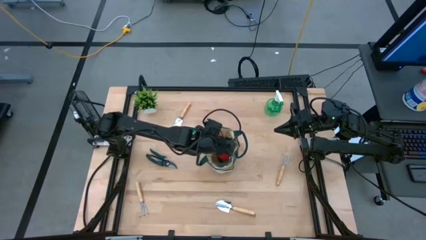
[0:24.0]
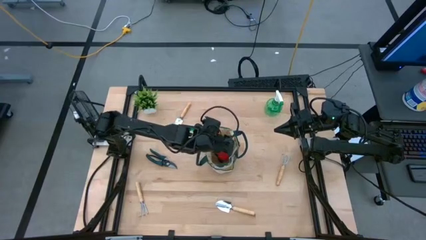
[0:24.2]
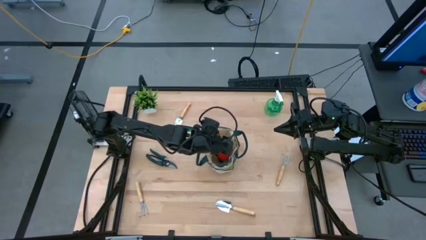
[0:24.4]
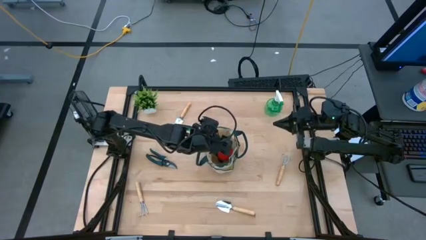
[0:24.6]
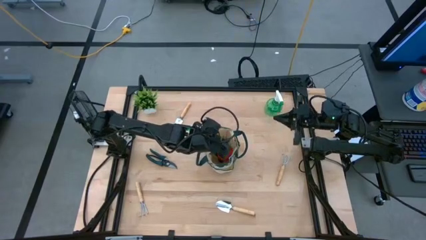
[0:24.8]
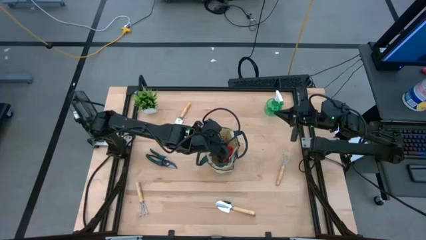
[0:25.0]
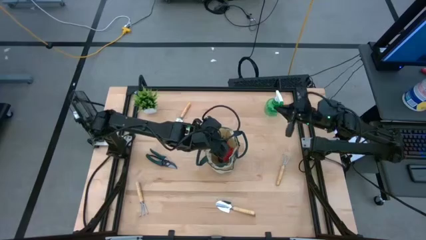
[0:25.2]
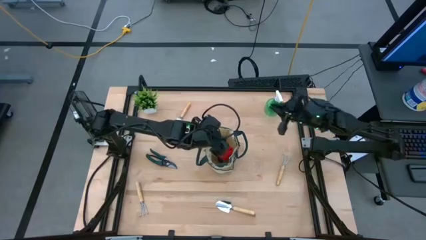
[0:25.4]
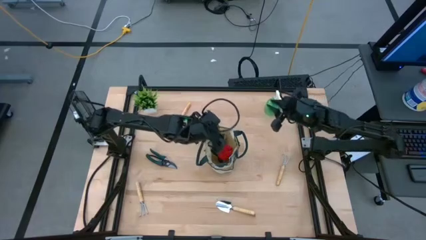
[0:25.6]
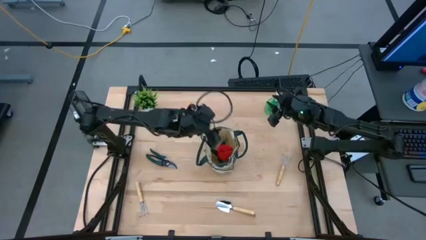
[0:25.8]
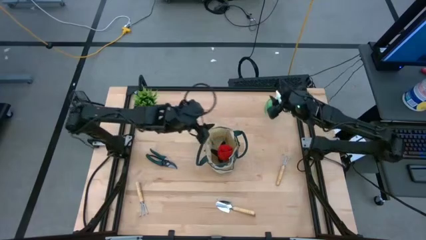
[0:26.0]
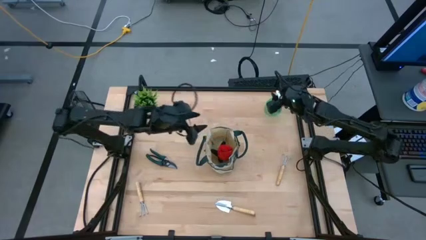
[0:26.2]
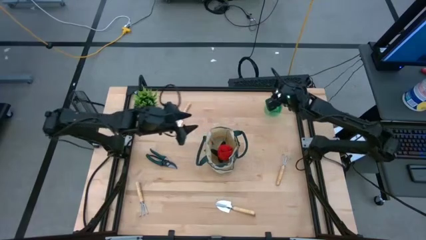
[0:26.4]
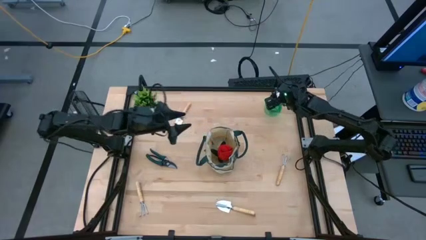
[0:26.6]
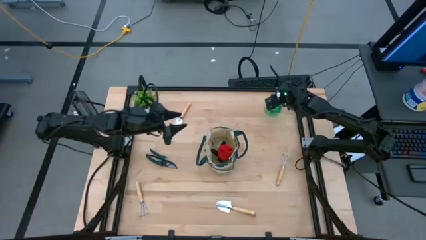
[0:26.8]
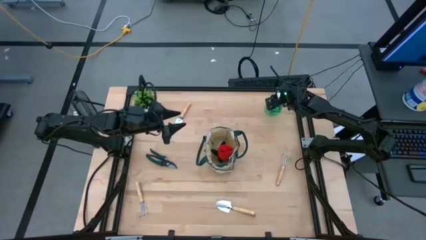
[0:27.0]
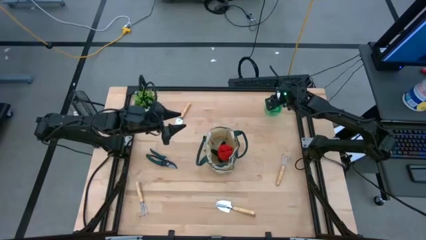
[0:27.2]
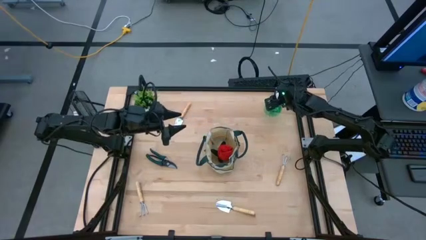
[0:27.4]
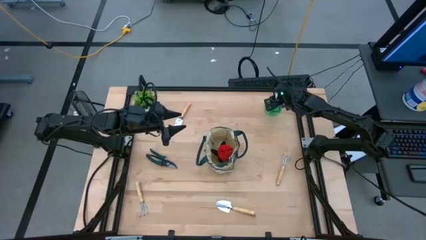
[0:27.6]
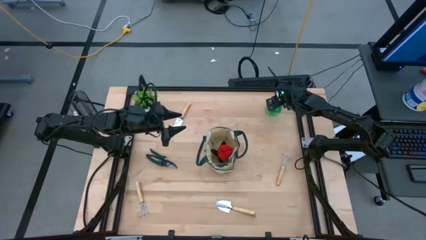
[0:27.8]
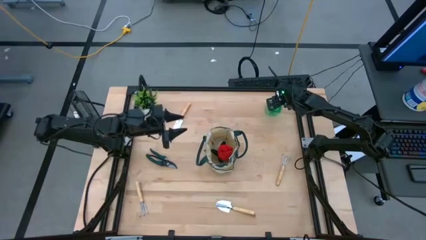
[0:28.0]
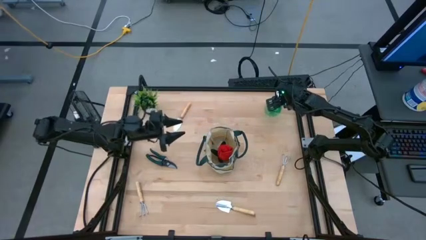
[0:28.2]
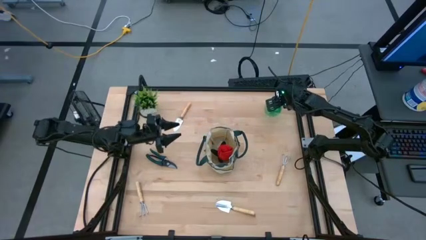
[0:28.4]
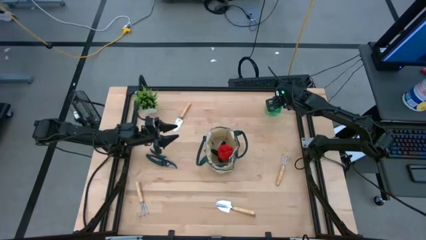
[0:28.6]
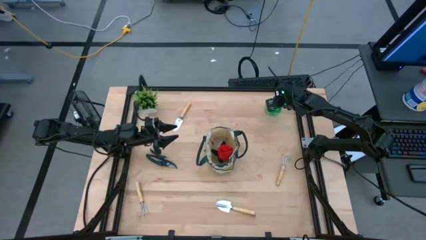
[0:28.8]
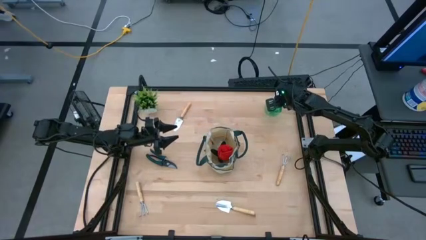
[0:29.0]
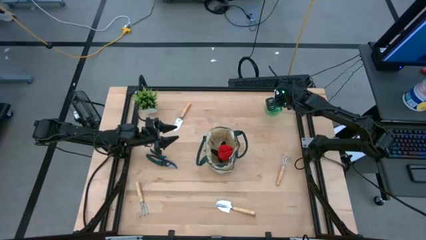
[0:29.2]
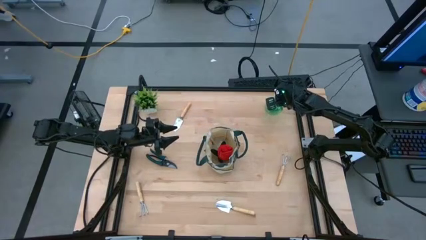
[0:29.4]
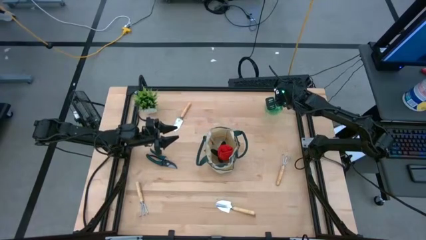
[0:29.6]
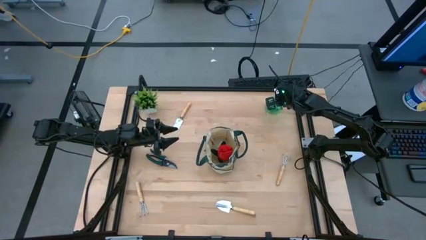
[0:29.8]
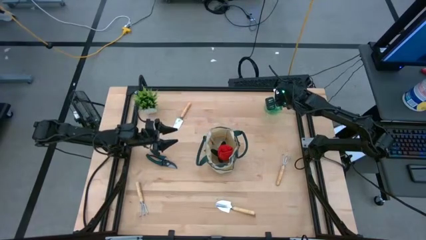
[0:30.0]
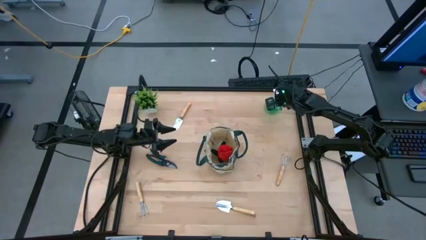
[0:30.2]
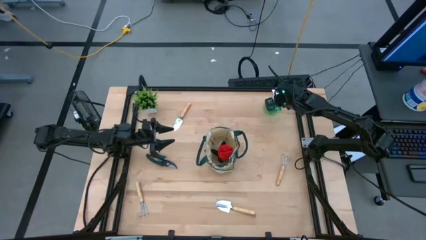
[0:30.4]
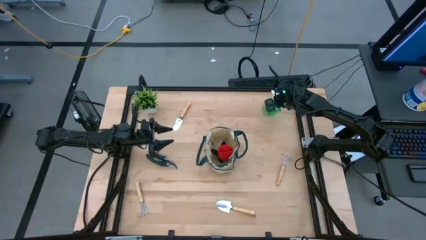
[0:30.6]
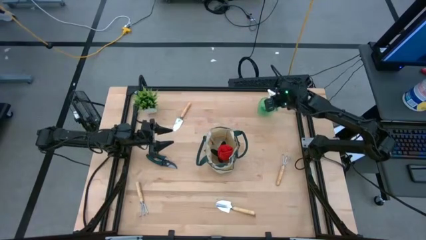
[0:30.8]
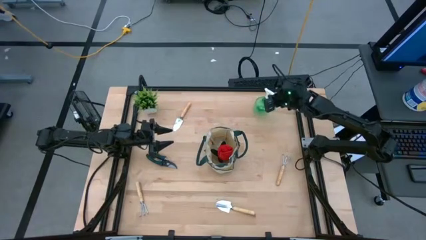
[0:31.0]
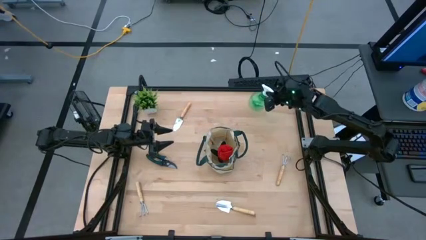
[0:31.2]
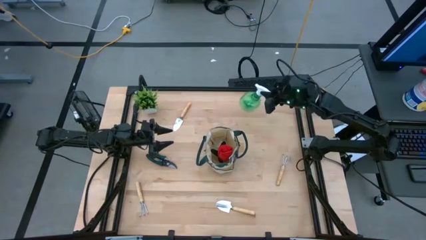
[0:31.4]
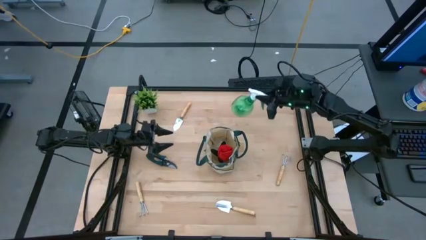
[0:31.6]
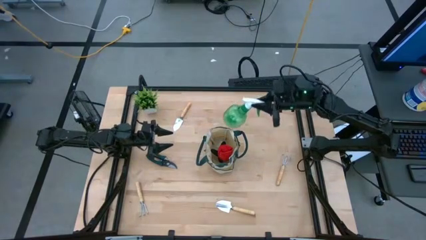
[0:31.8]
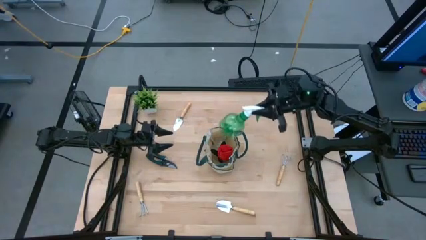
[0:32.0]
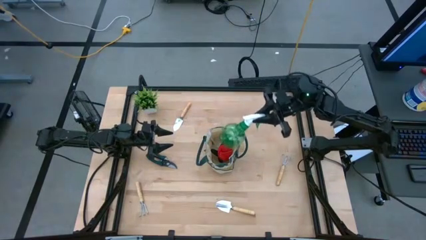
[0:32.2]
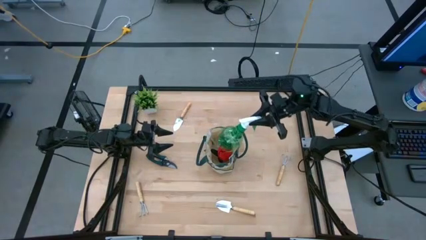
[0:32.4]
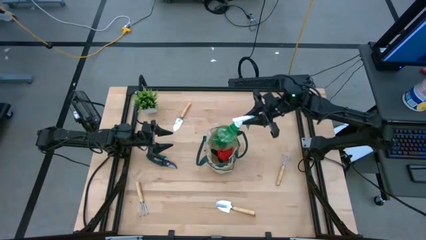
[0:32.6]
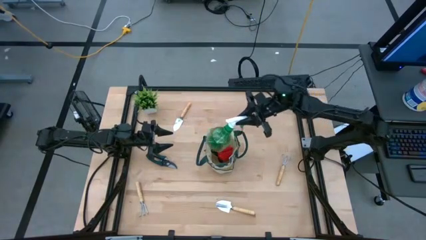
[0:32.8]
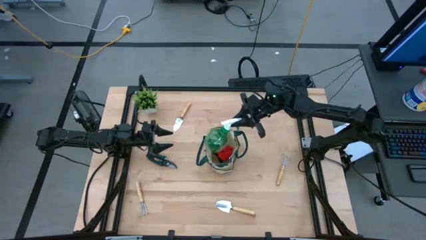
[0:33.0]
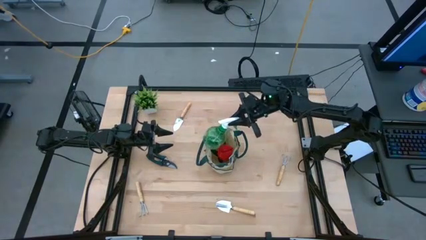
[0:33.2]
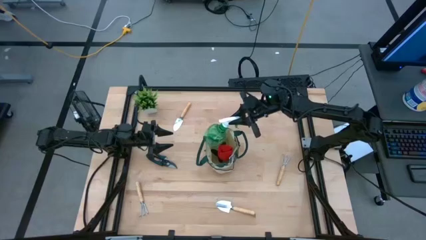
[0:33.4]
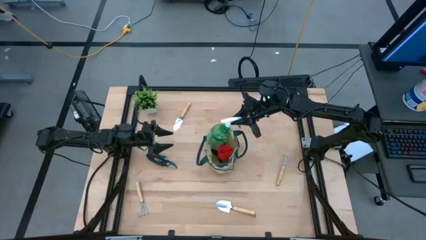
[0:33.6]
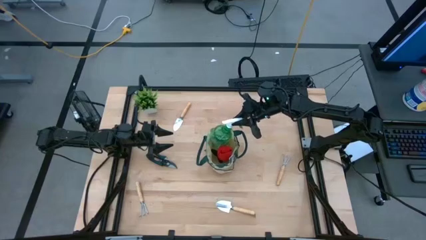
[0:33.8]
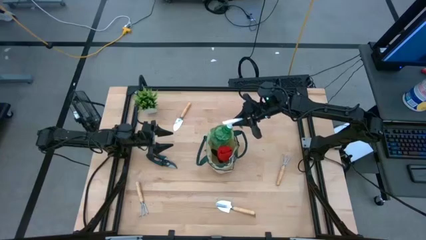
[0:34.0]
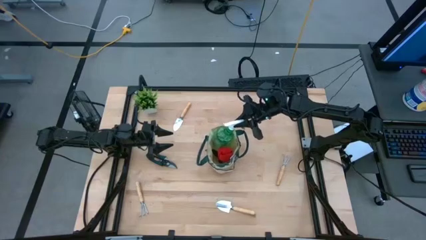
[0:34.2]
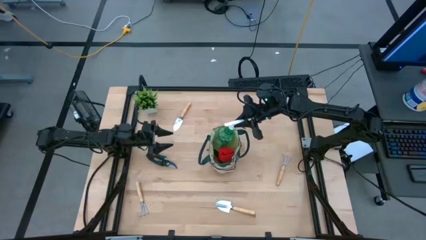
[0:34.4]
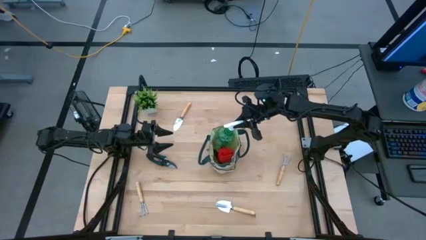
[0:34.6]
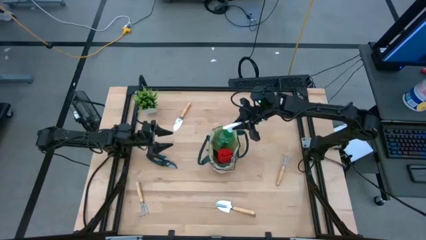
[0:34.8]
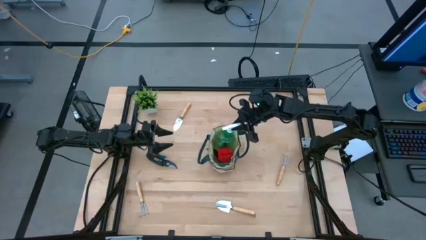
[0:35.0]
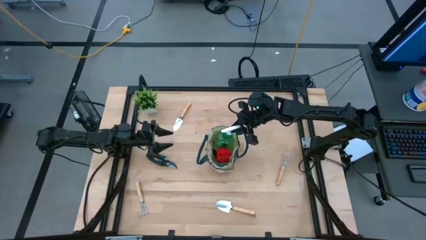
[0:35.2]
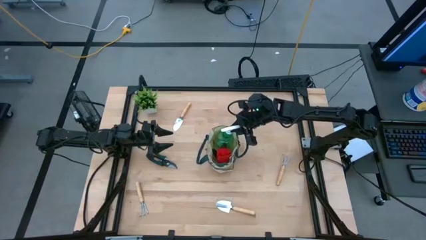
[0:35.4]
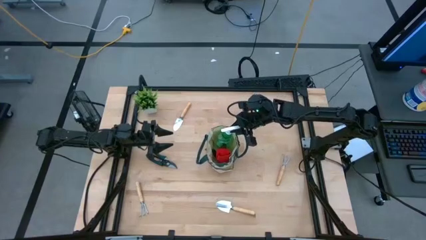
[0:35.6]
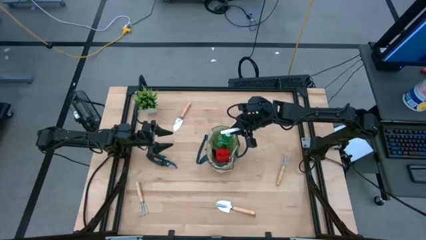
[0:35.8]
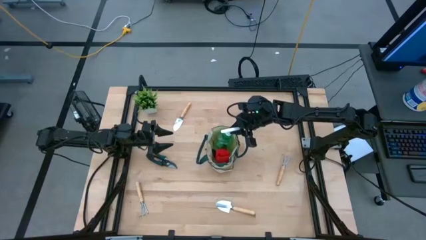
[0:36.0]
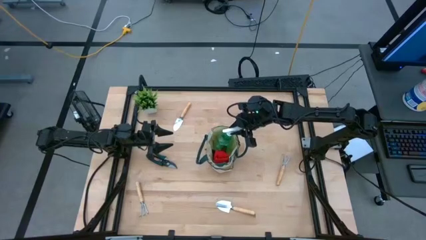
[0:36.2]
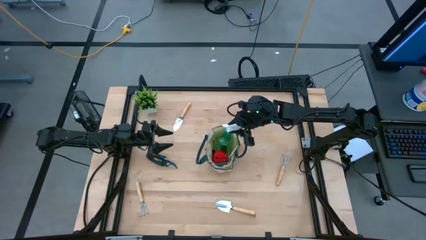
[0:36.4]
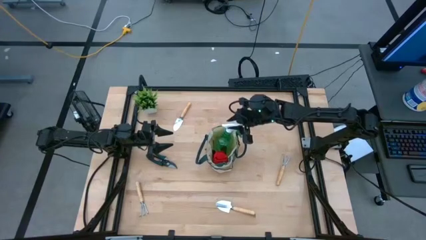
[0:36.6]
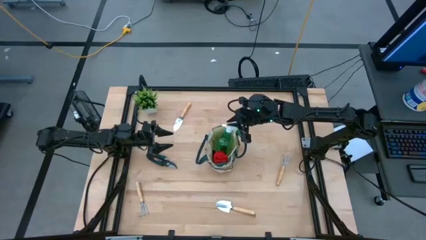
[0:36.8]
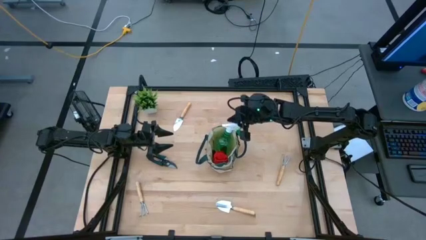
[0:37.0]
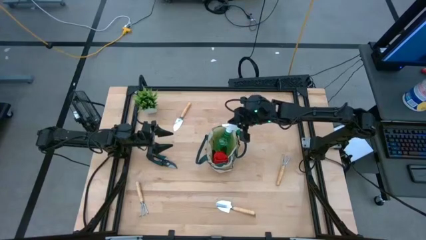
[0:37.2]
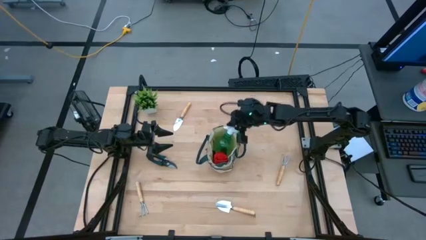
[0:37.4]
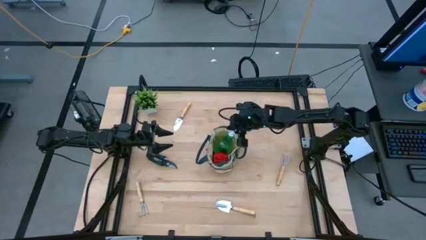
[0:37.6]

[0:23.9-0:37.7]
Task: Pick & Place Garden tools in Gardening bag
Put the green spray bottle into the light brown gardening bag
